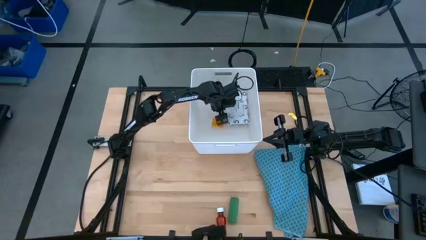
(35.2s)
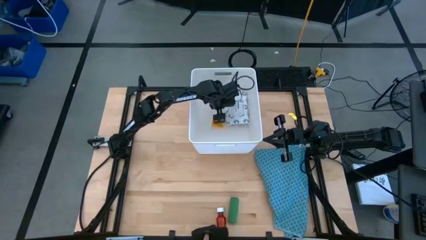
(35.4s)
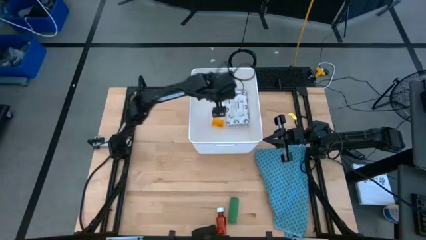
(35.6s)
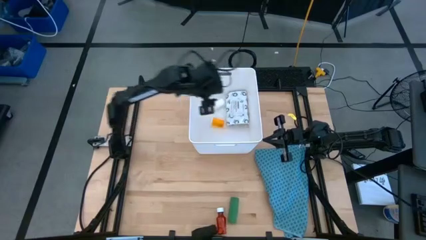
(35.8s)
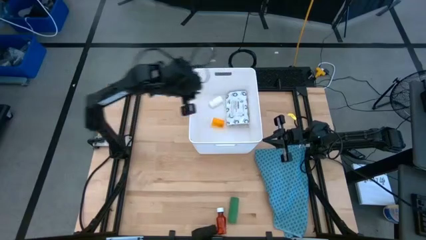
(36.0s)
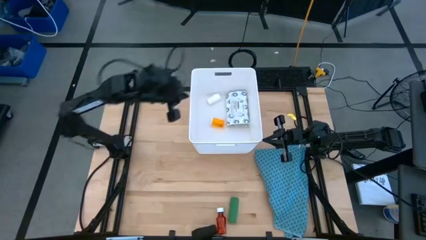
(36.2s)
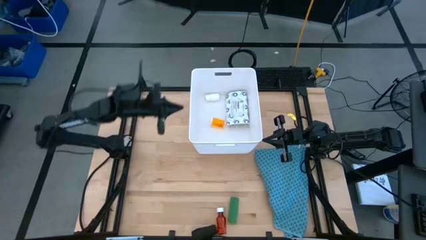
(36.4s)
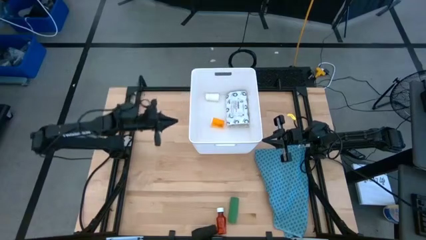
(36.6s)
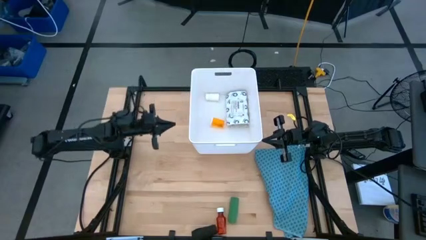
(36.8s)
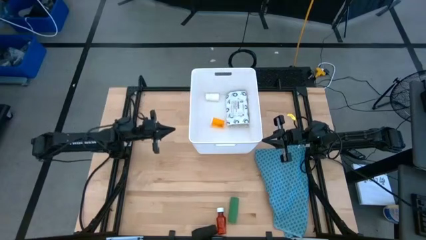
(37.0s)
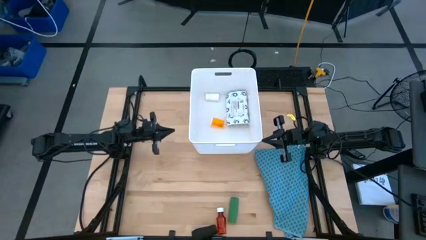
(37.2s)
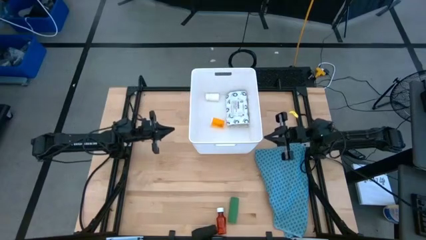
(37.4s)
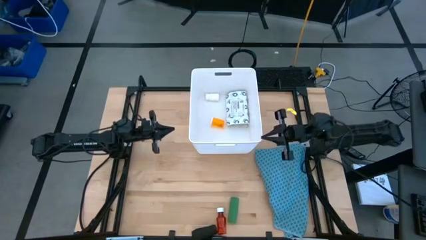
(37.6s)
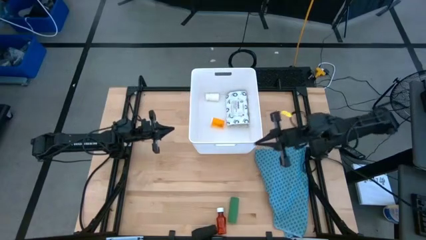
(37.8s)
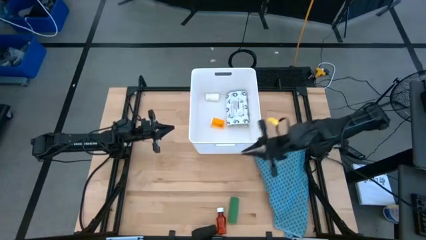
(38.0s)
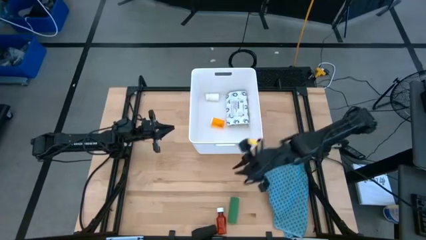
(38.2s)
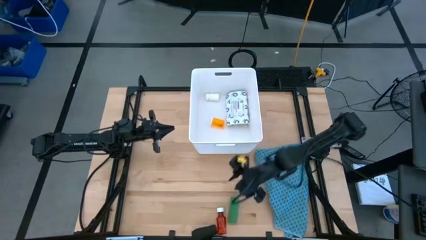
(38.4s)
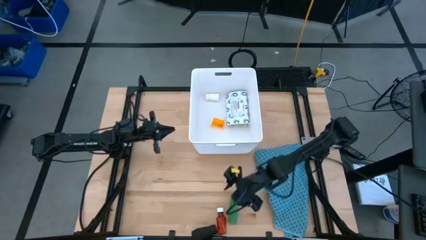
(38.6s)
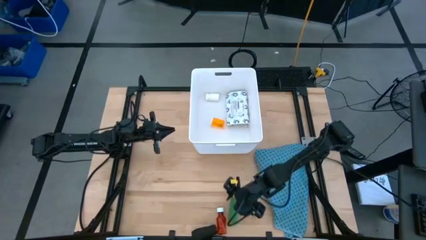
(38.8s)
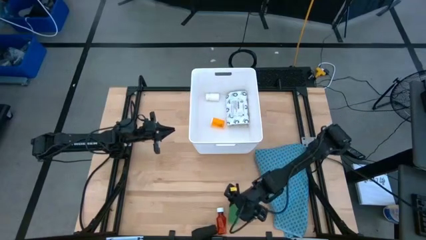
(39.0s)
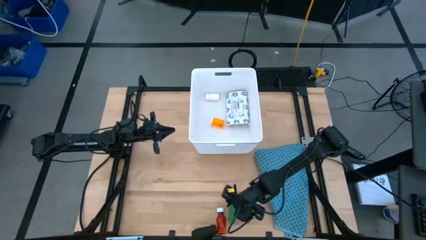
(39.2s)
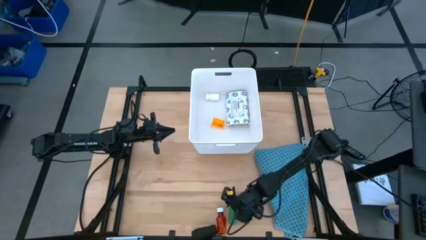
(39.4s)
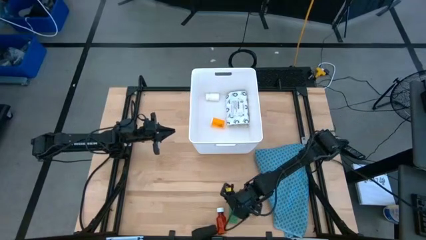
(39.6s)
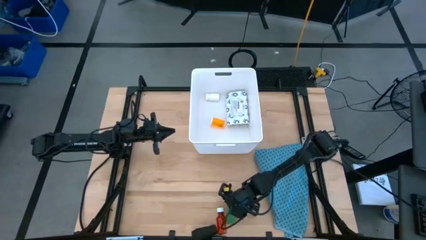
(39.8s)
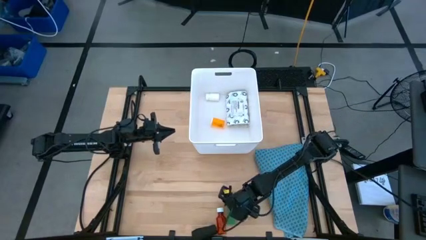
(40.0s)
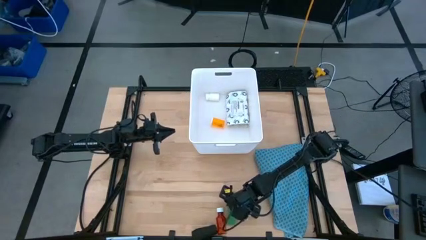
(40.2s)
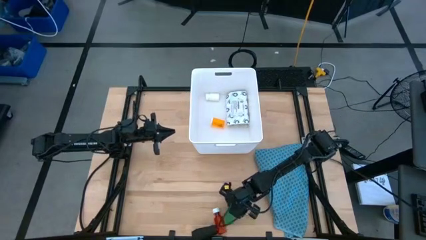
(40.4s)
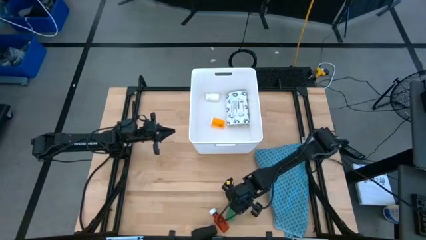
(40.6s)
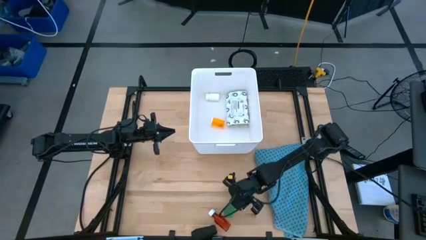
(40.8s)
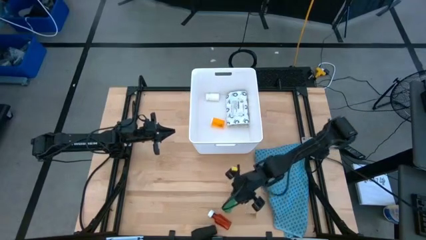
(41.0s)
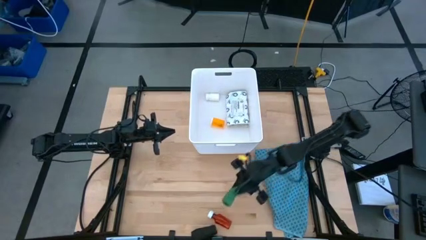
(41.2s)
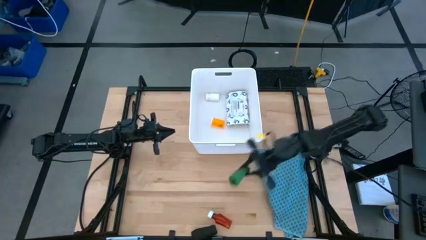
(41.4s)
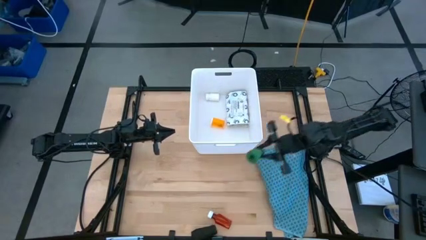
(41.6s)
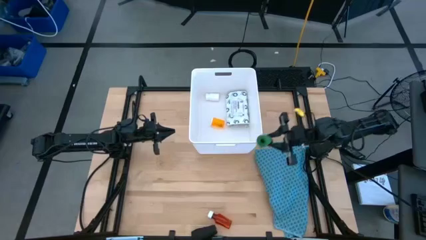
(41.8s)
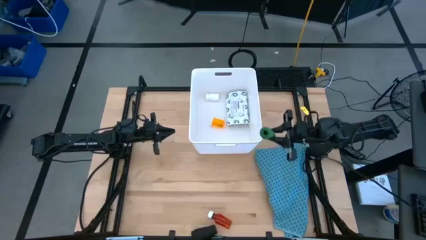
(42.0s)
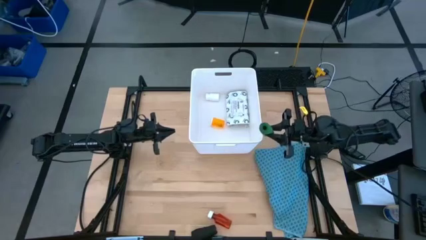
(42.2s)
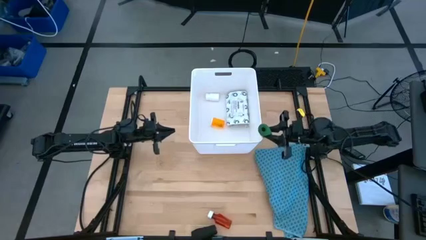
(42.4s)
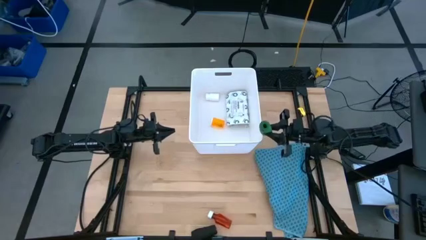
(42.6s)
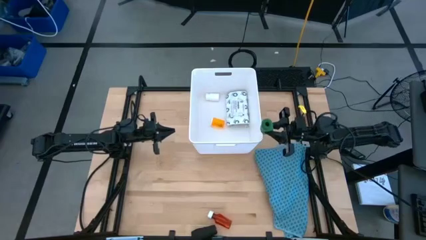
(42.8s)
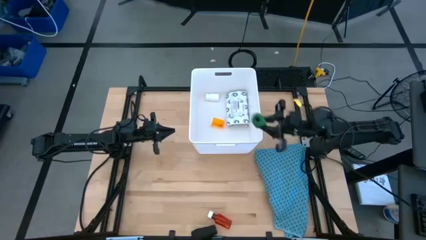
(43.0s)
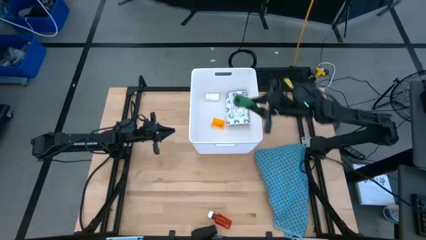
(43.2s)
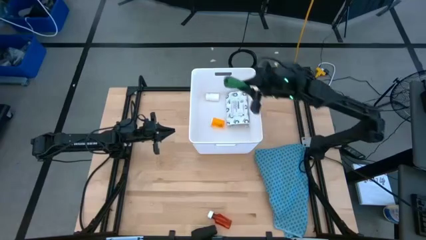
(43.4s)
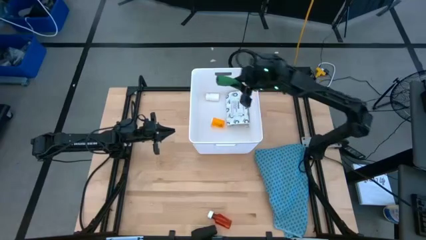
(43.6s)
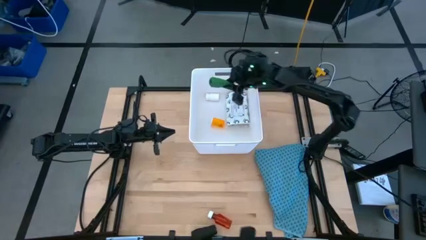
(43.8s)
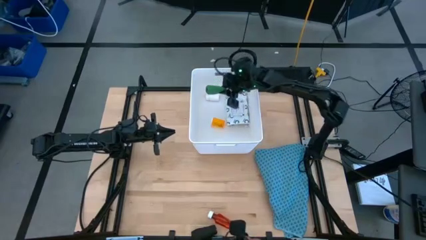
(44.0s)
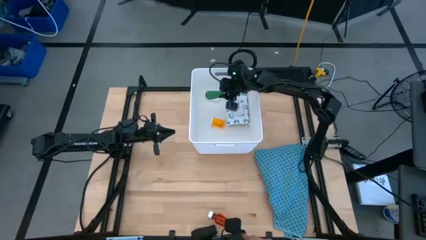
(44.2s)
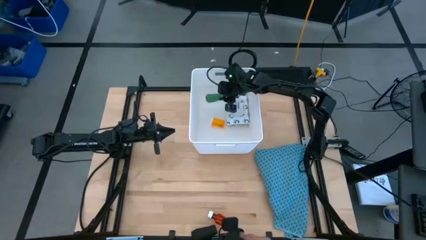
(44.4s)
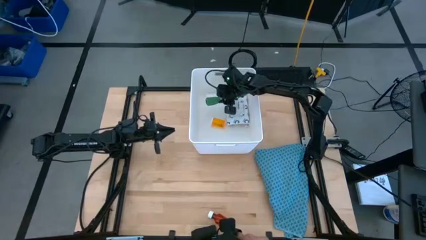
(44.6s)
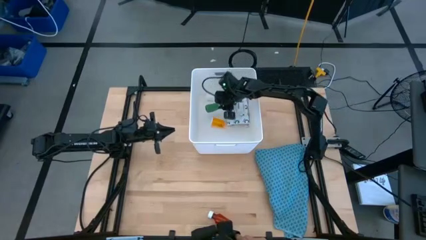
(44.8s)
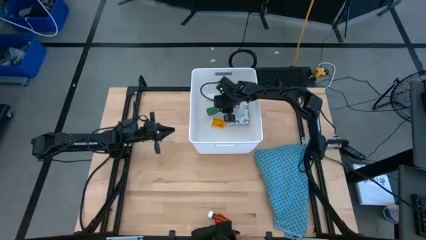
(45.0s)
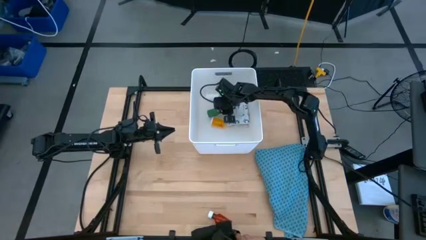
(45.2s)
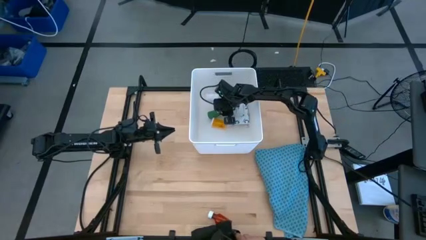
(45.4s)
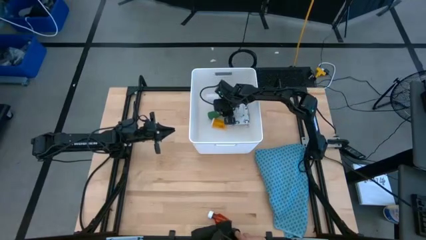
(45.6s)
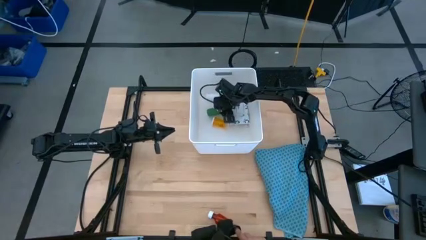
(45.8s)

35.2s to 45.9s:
Task: Pick & place medical supplies in basket/bin
Put the green bandage into the white bin

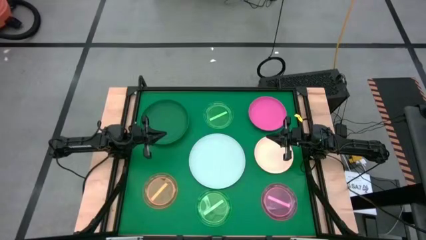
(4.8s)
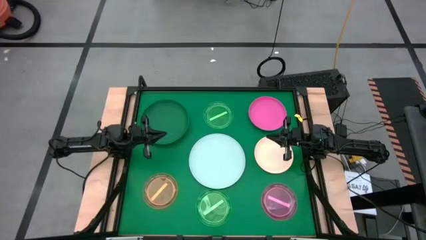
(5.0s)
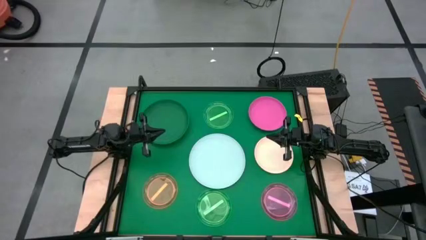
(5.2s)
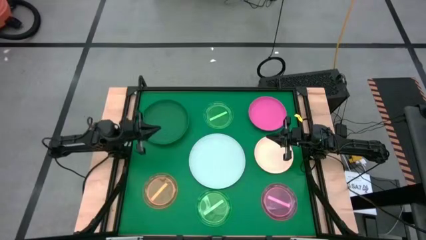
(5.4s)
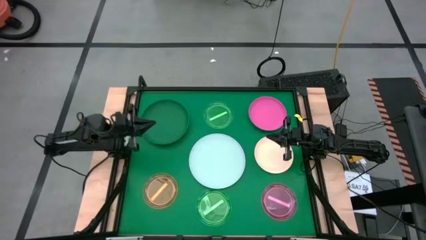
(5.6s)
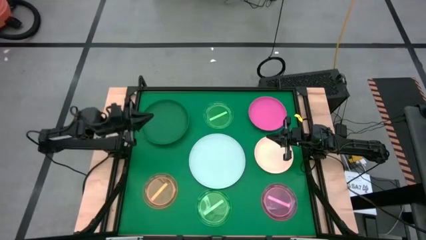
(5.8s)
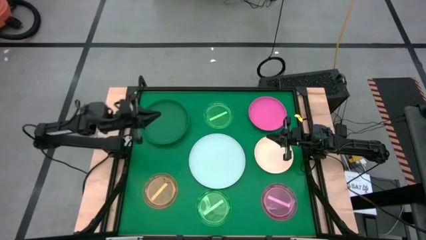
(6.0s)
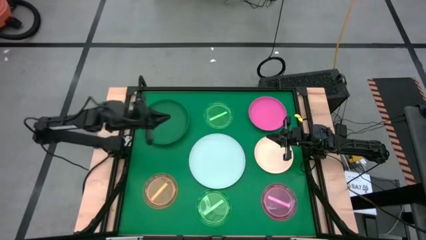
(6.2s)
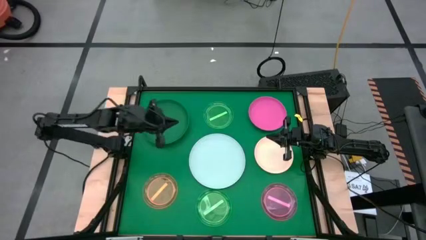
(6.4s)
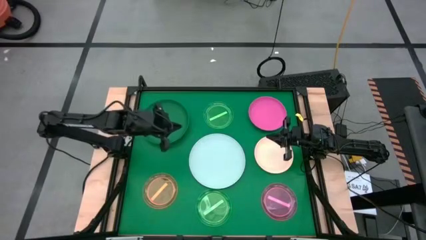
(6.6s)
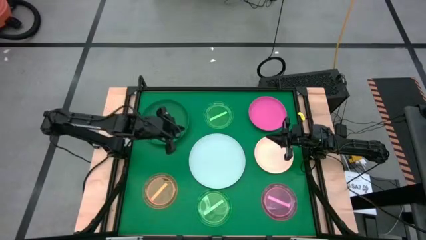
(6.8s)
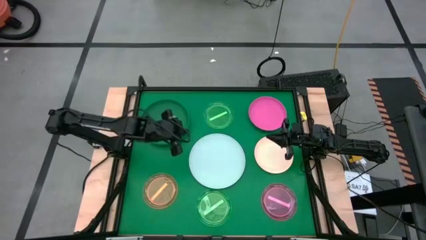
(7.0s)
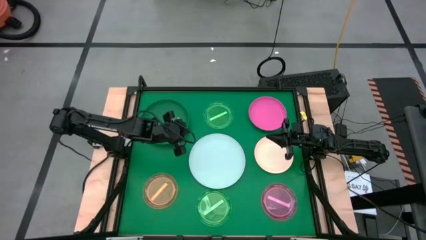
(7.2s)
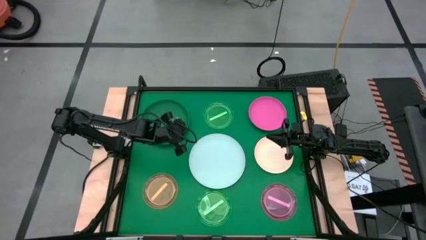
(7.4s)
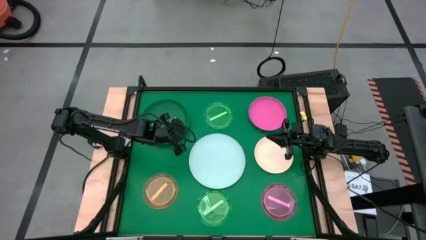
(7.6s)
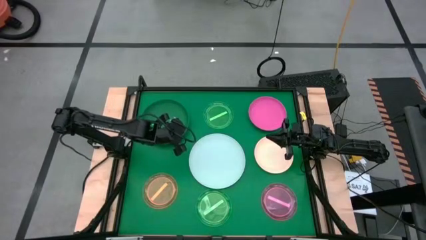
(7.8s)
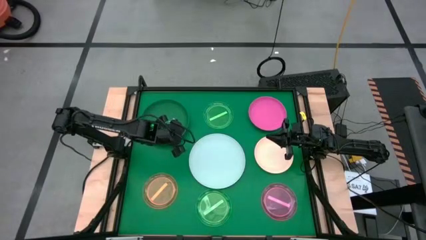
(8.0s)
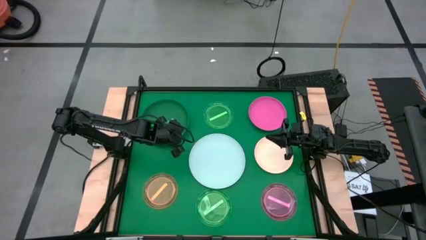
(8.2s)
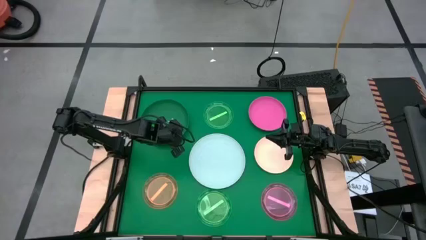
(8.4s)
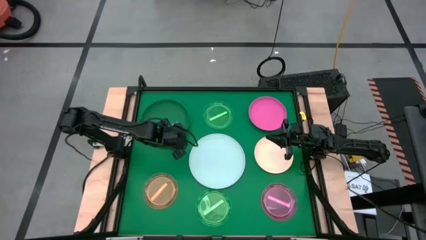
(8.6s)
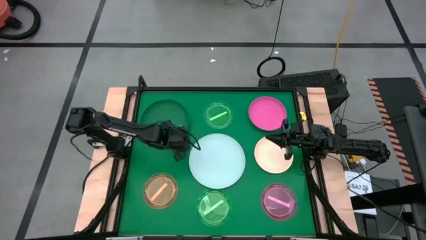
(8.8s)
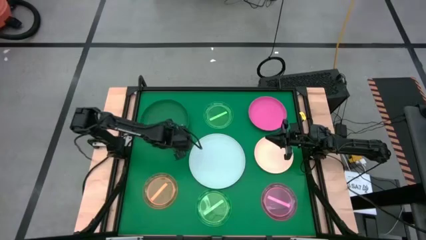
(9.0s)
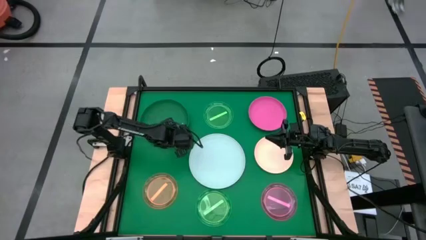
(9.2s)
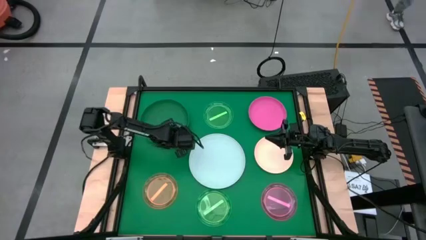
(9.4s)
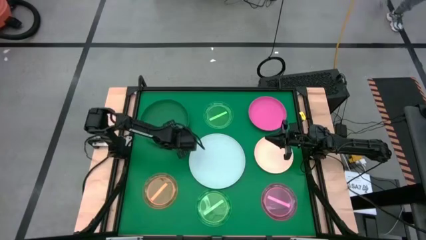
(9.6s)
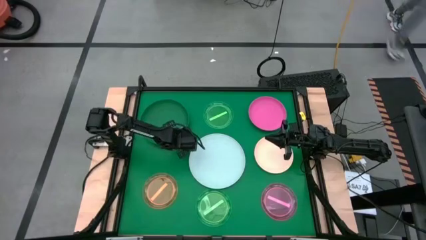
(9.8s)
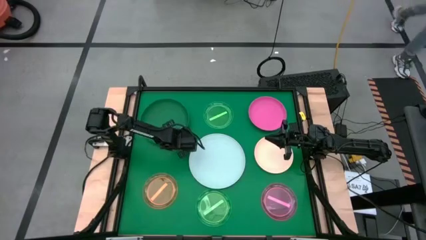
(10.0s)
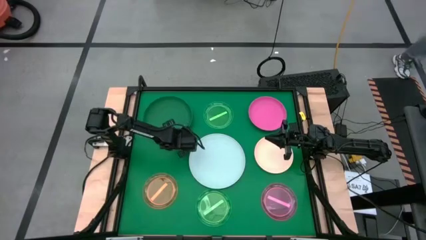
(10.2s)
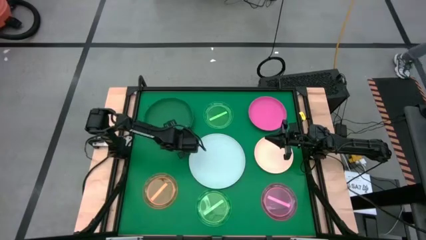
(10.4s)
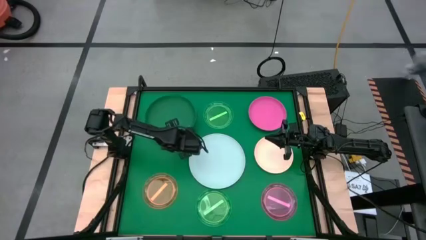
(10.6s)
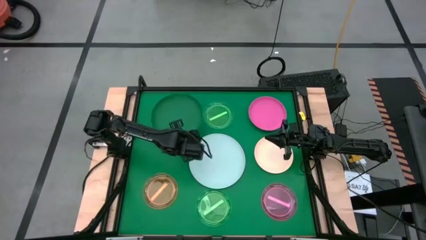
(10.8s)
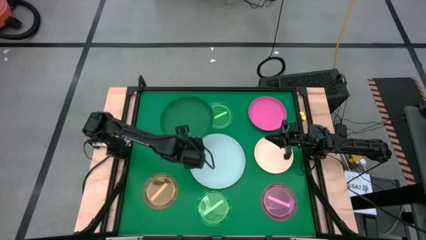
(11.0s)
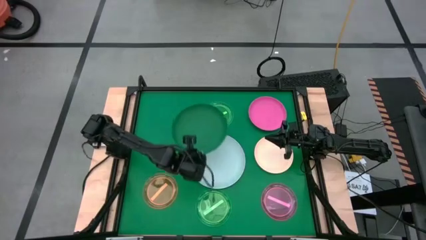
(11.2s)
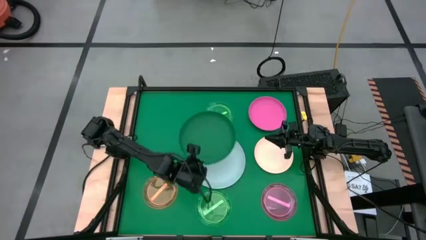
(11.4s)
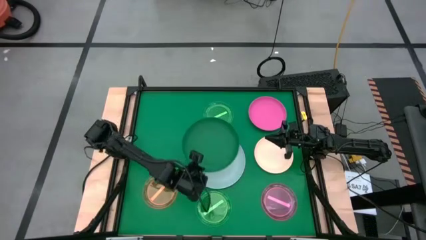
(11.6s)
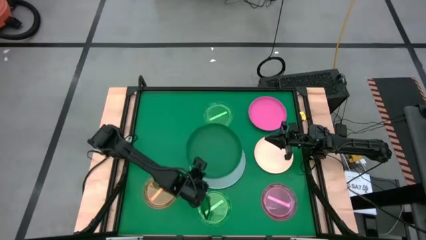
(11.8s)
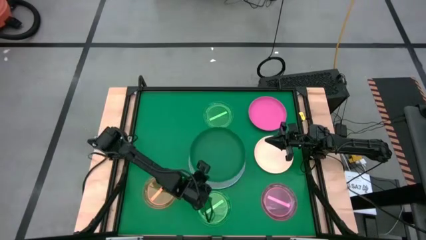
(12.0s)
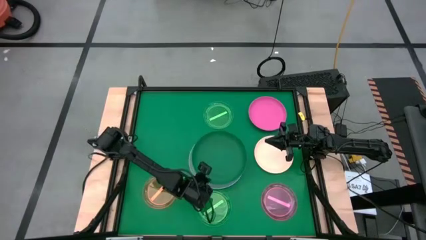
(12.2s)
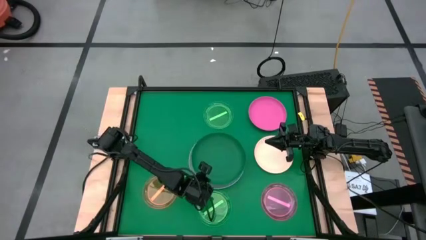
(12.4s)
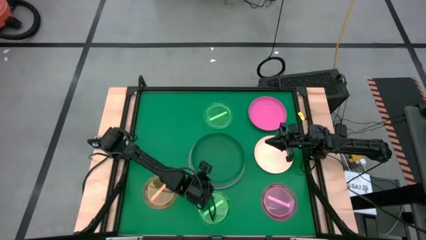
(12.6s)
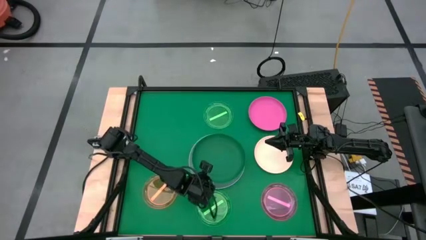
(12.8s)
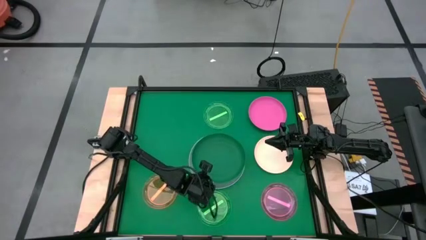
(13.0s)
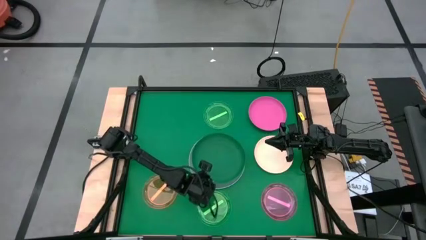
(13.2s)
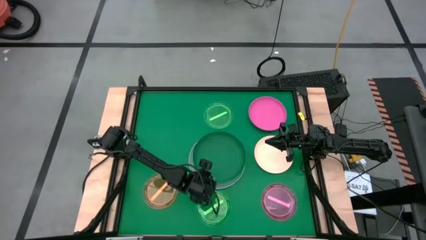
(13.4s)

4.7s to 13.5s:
Task: Stack plastic plates
Stack the large green plate on top of the large blue plate
